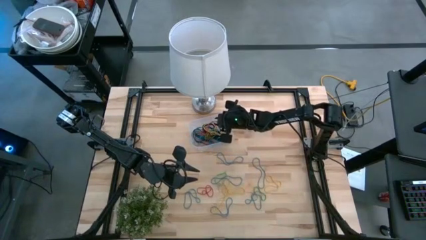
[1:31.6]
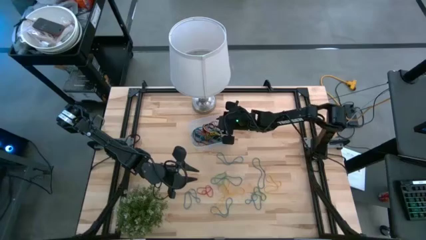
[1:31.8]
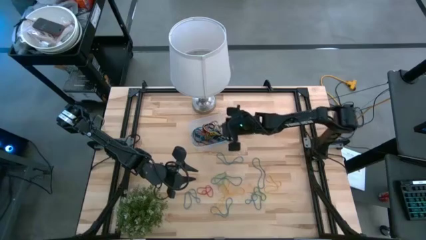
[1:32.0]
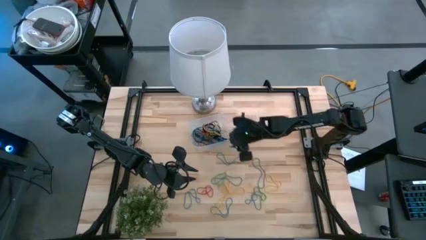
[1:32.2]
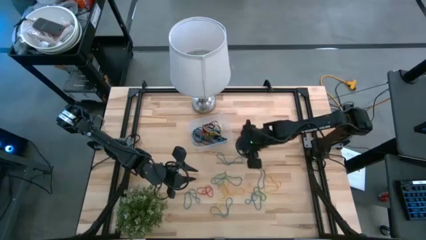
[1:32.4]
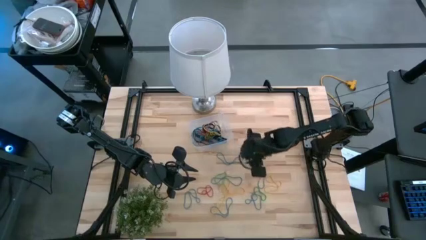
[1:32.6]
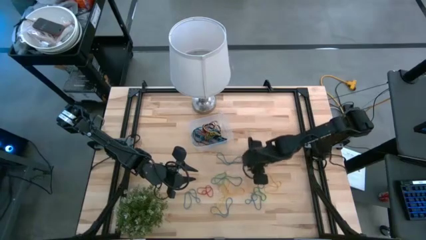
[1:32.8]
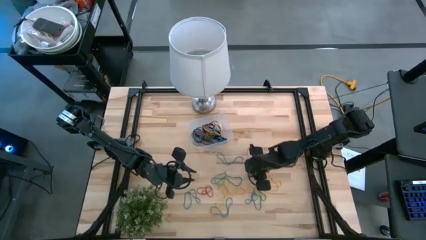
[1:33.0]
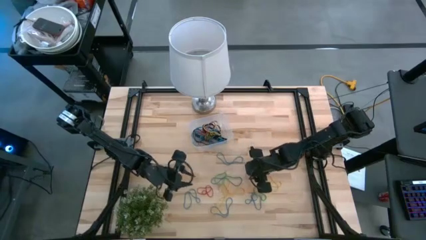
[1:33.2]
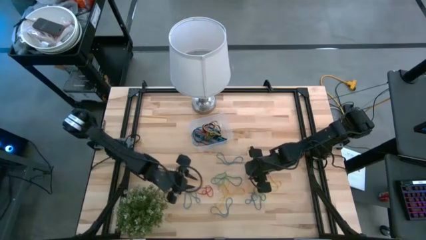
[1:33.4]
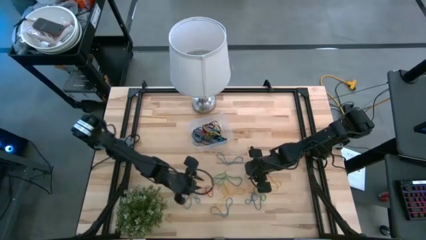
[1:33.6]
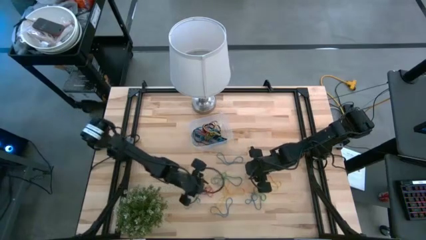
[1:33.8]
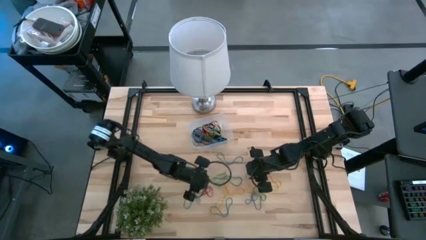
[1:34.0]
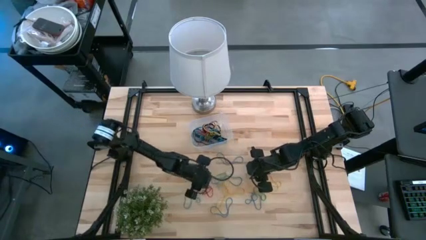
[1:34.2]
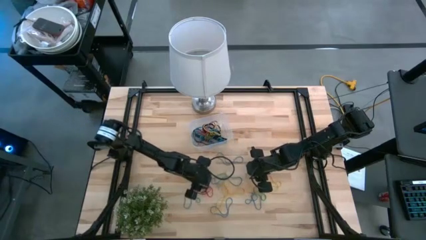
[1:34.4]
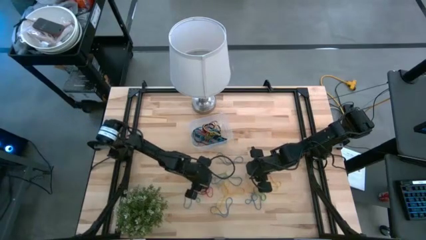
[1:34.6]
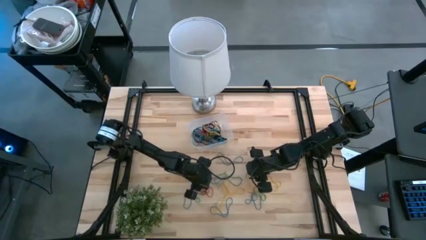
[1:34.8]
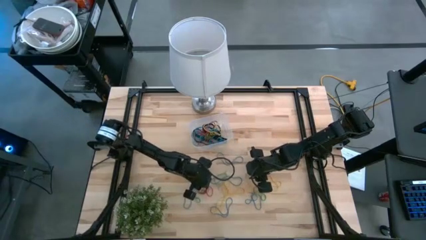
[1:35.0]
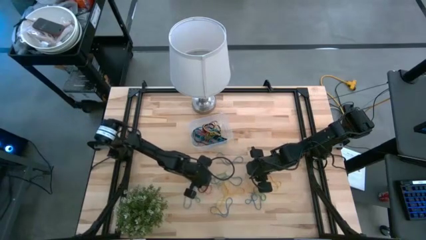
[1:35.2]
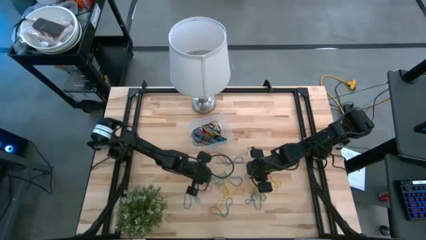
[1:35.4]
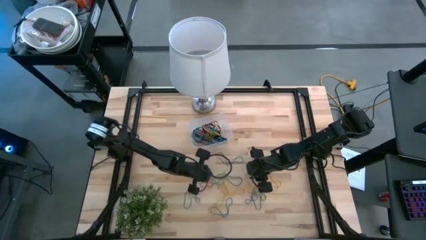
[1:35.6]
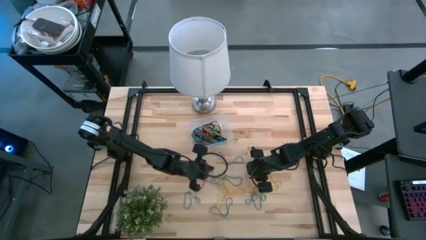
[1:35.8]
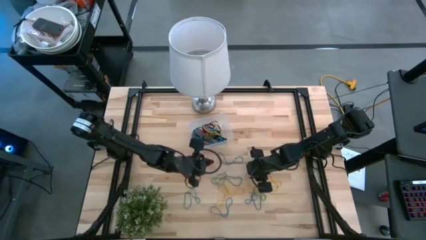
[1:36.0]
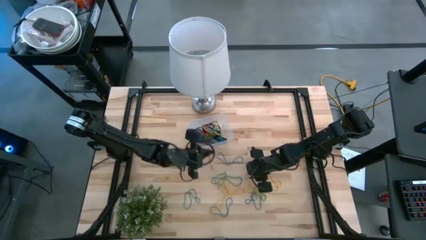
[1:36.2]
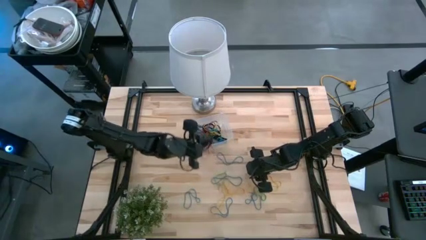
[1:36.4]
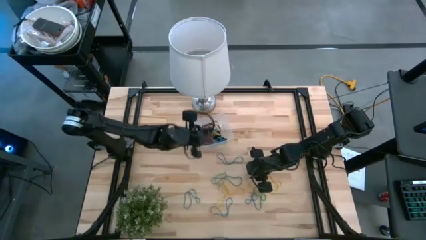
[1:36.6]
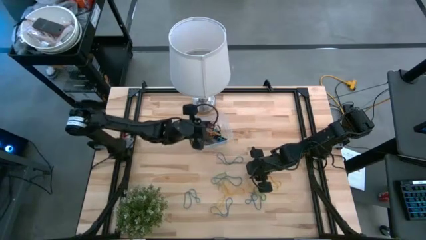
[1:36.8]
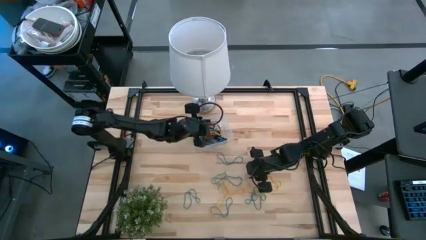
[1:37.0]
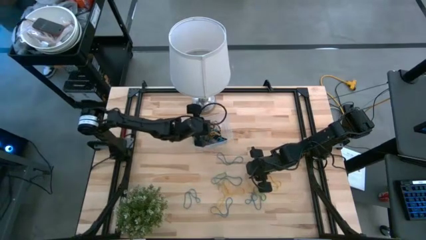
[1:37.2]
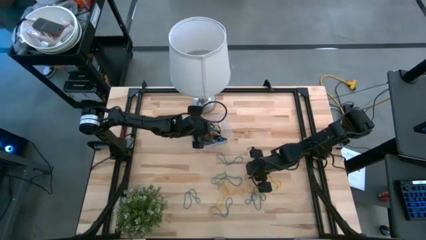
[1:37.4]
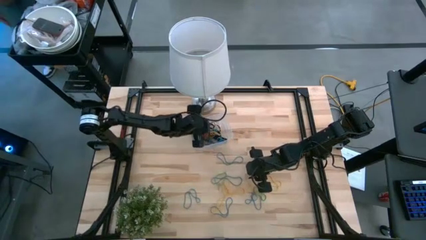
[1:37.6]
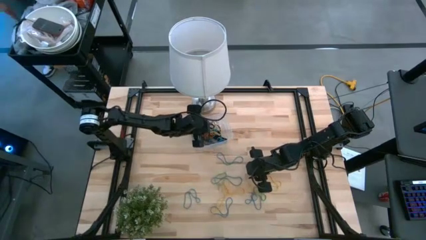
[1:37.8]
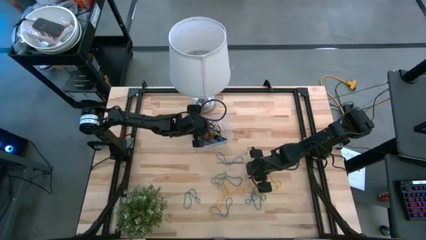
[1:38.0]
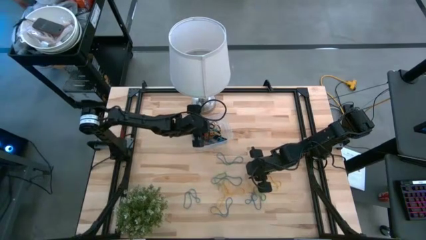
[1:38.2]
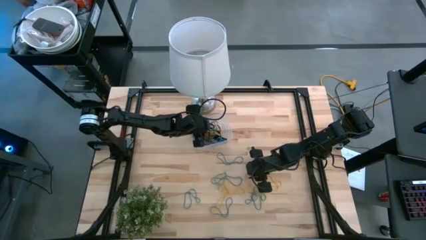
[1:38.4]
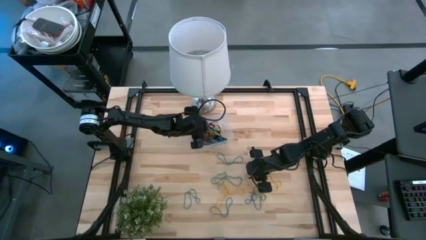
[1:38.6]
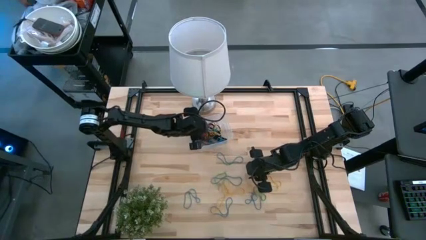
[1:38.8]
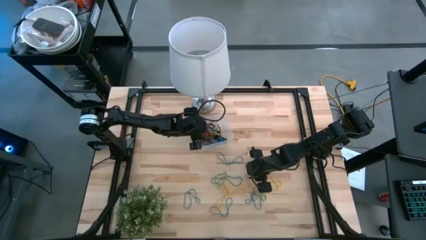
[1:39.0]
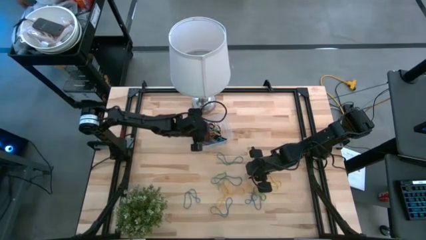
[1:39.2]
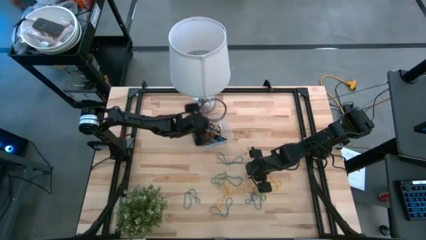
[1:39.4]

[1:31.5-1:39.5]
Task: Pick and place rubber bands into bin
Put the red rubber band into the transparent container

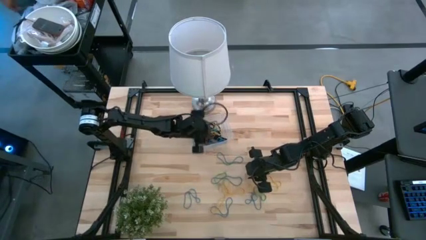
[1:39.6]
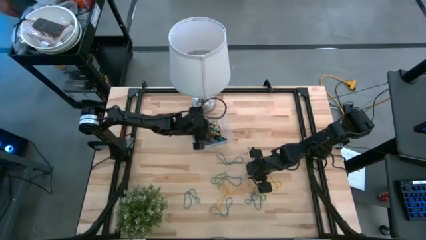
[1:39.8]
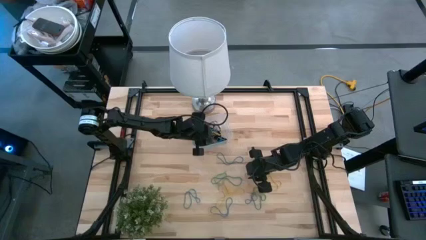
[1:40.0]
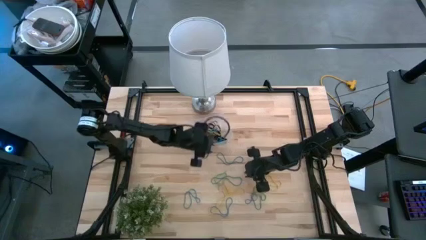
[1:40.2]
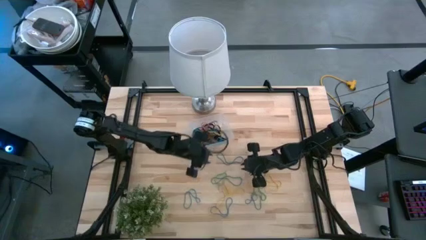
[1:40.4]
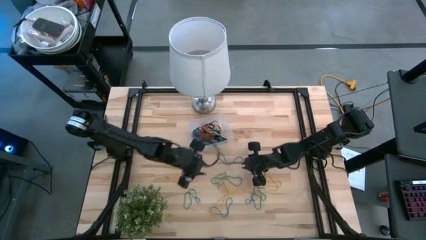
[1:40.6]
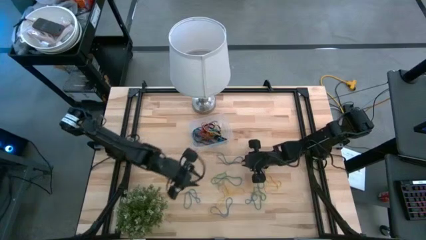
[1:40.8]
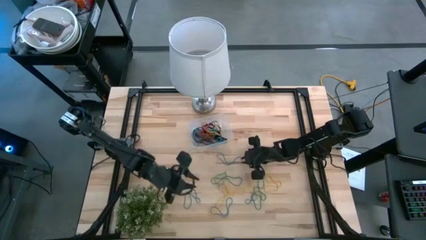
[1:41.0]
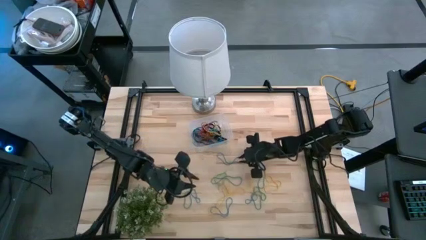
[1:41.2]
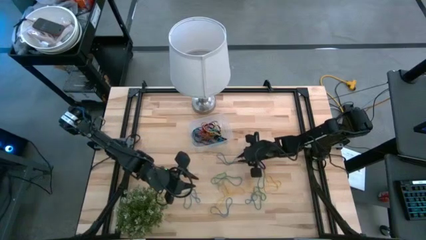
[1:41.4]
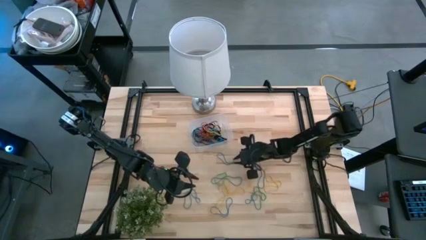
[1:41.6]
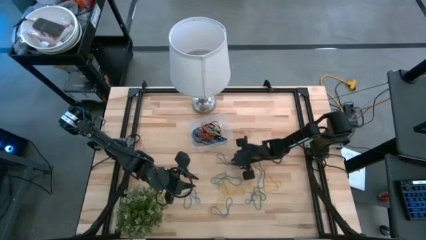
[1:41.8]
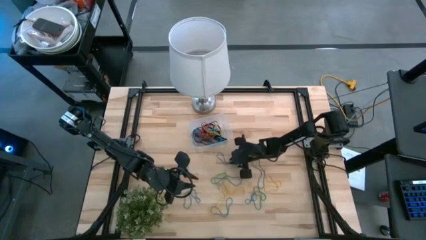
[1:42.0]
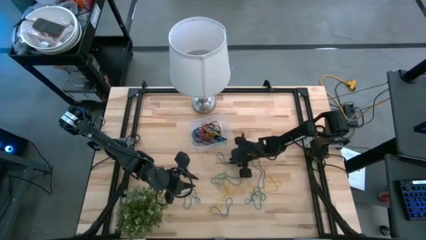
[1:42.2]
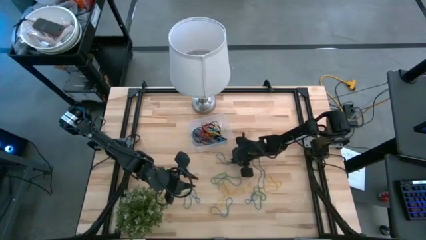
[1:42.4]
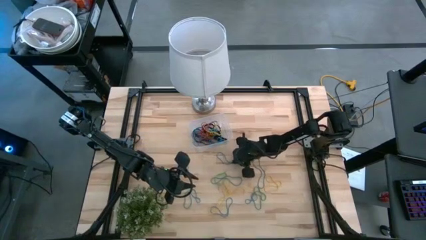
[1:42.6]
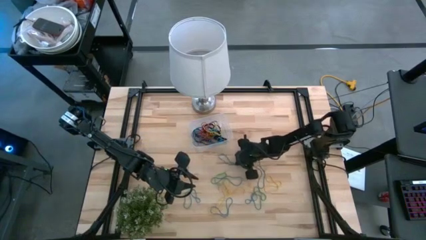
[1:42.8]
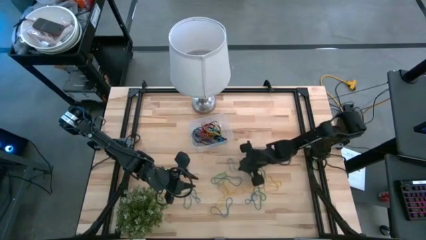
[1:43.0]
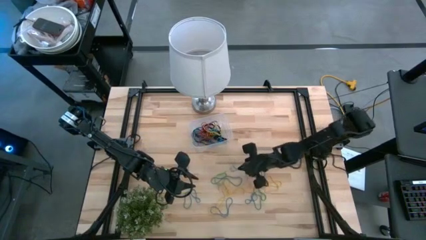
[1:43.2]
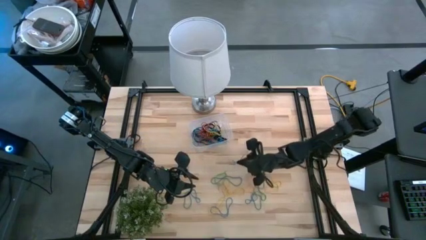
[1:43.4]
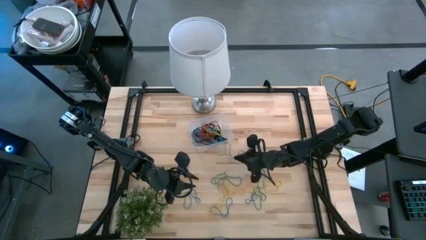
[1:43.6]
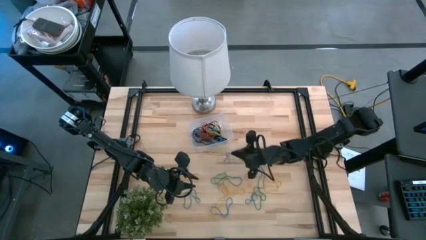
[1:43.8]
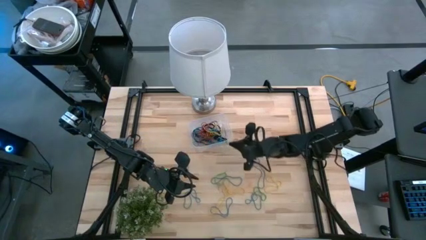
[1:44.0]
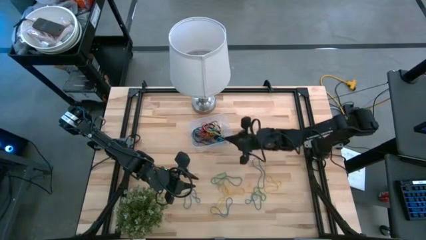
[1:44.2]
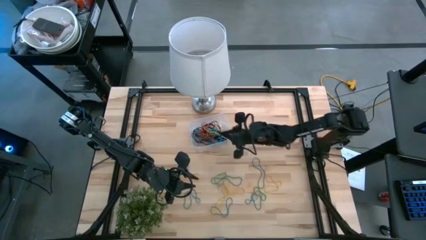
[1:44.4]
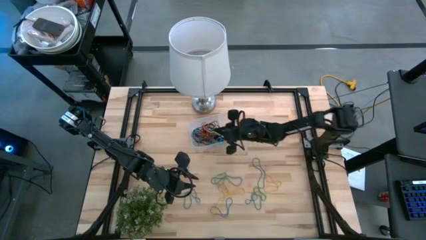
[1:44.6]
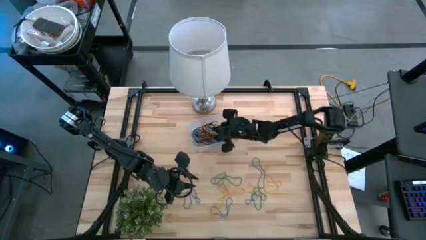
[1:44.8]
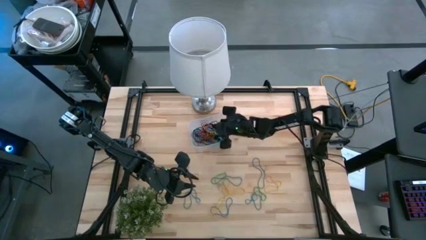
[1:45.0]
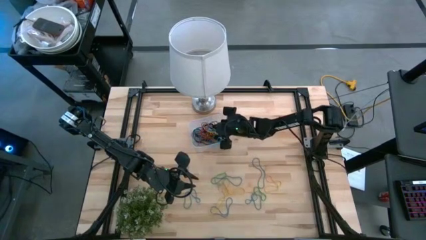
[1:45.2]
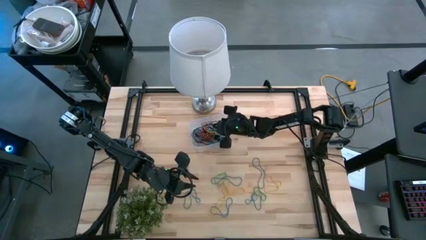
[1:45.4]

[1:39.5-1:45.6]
Put the blue rubber band into the transparent container

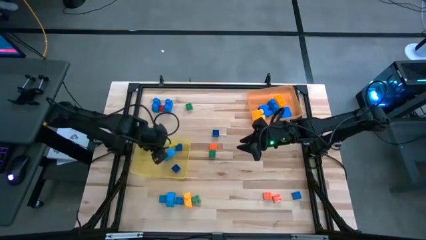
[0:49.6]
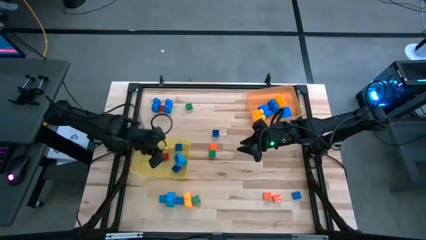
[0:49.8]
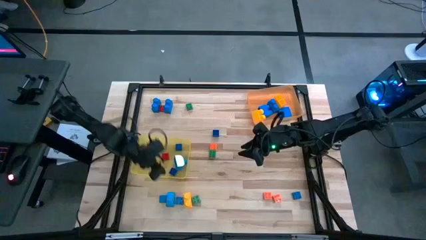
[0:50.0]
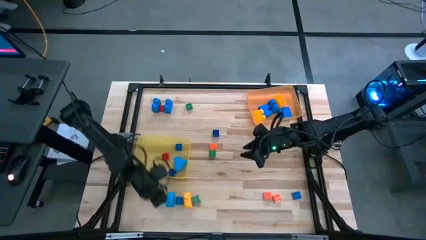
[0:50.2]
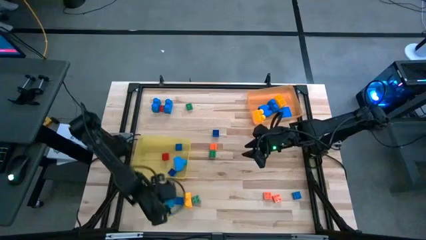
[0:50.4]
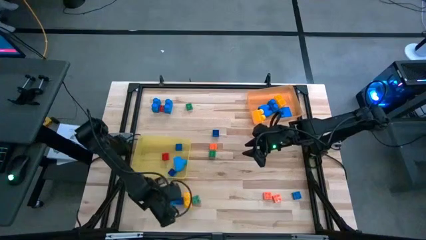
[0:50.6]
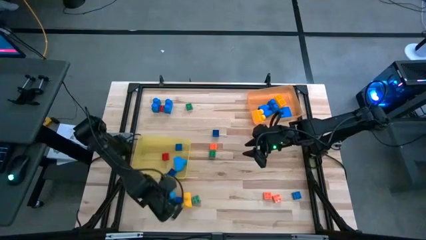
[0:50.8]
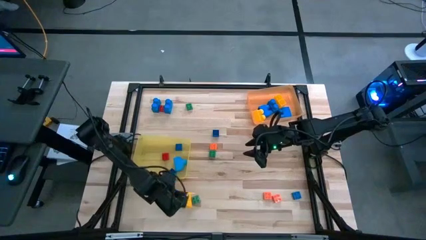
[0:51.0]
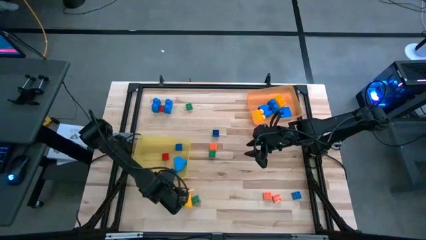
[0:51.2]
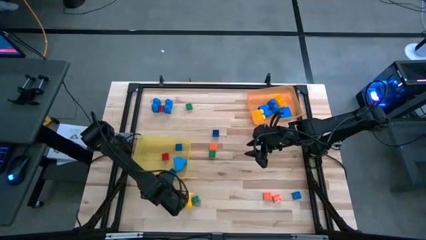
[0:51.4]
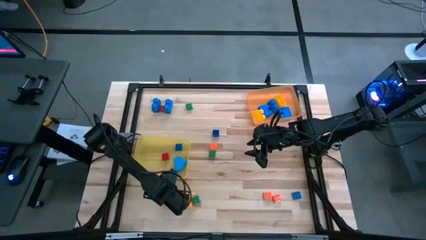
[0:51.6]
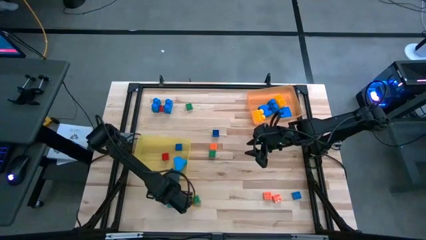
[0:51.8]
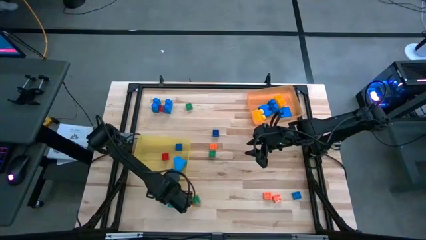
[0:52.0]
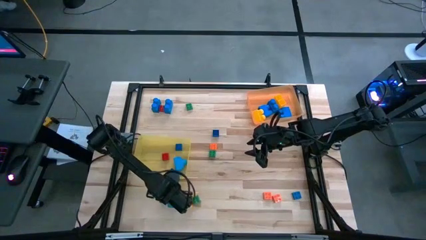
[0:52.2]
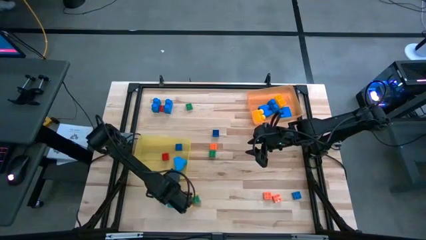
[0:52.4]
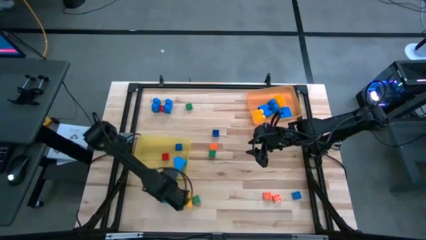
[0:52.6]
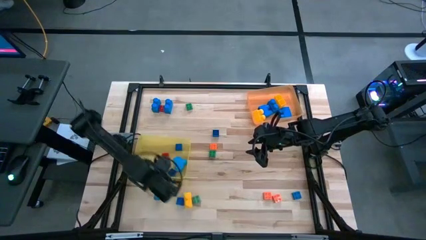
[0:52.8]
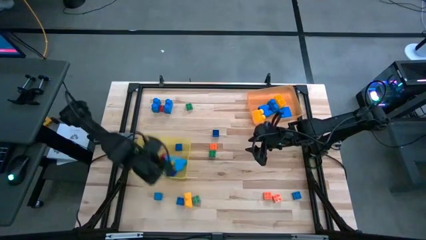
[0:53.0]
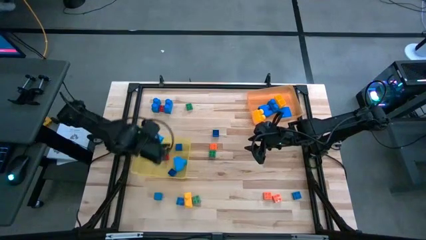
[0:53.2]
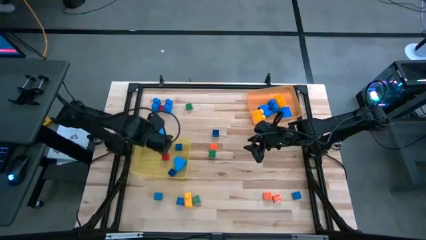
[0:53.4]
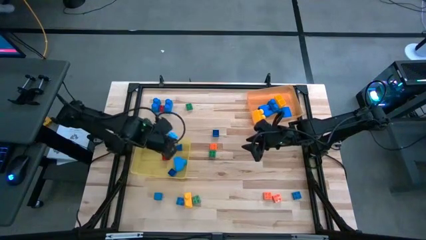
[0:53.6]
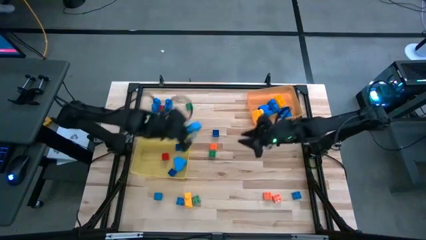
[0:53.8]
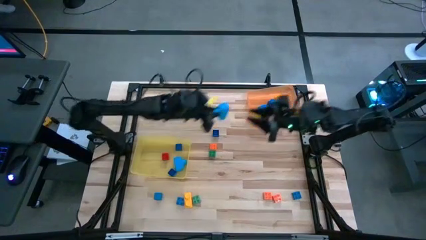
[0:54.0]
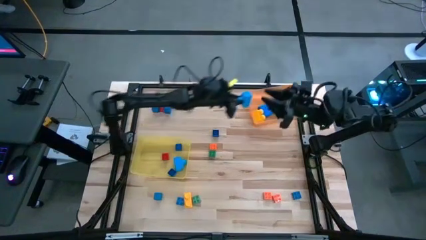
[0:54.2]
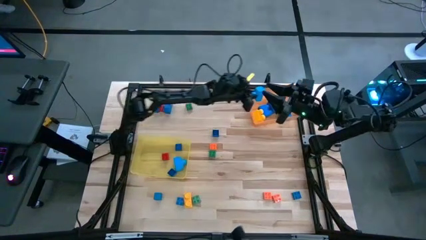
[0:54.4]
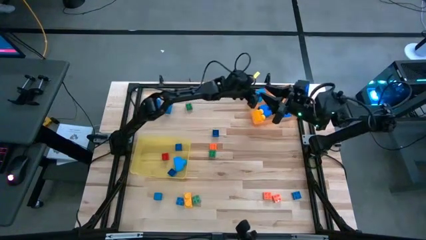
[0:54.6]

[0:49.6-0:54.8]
Task: Sort blocks by size
Put the large blue 1 stud game piece into the orange bin
